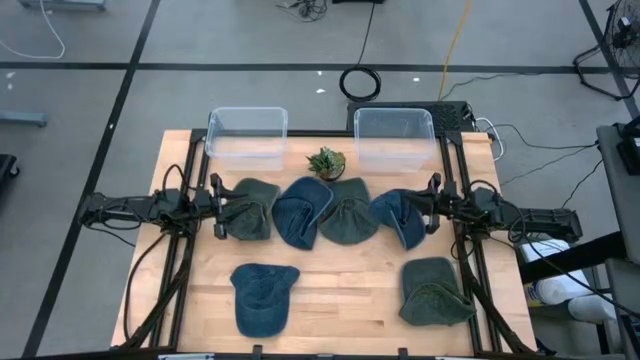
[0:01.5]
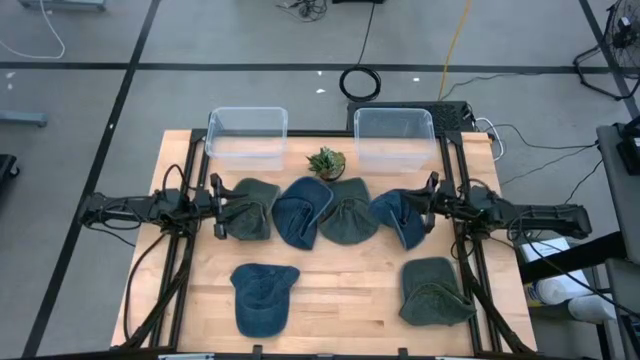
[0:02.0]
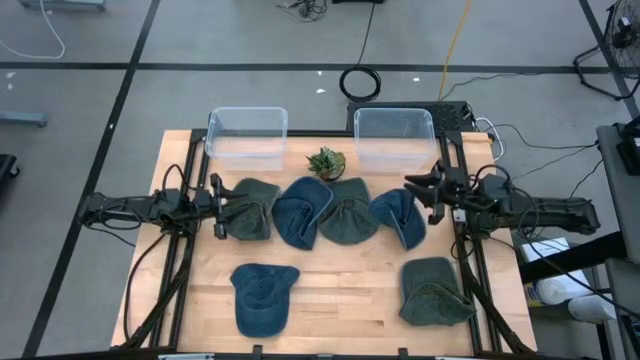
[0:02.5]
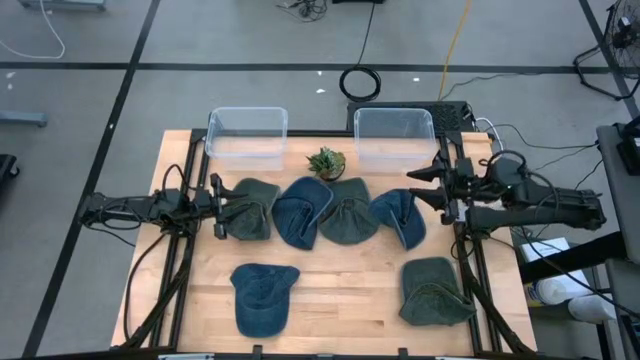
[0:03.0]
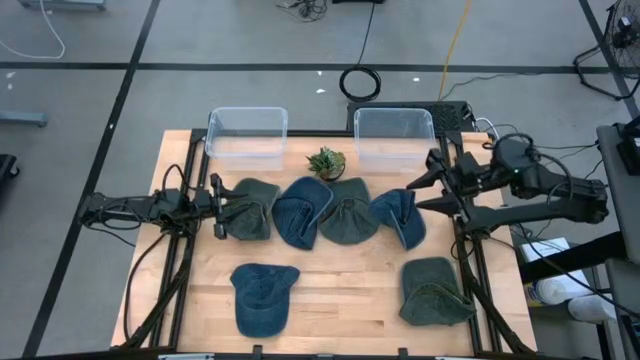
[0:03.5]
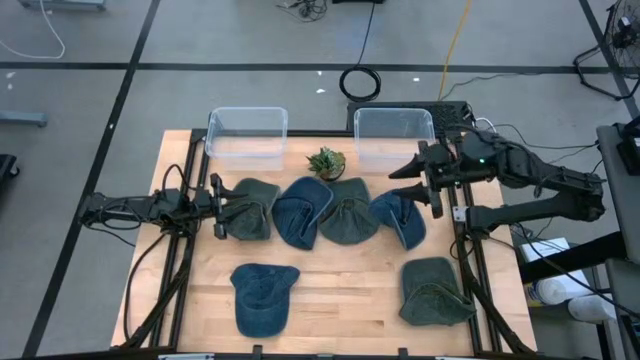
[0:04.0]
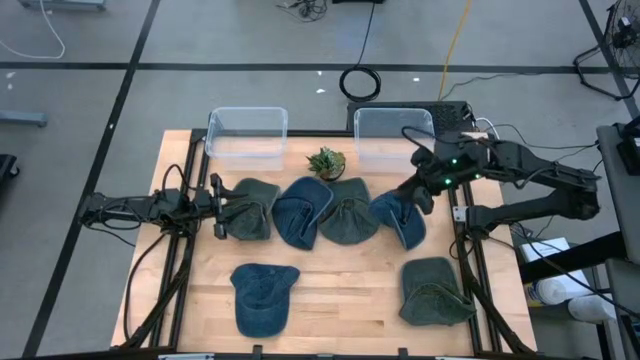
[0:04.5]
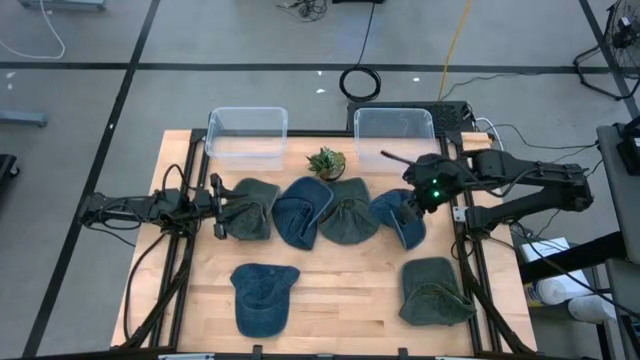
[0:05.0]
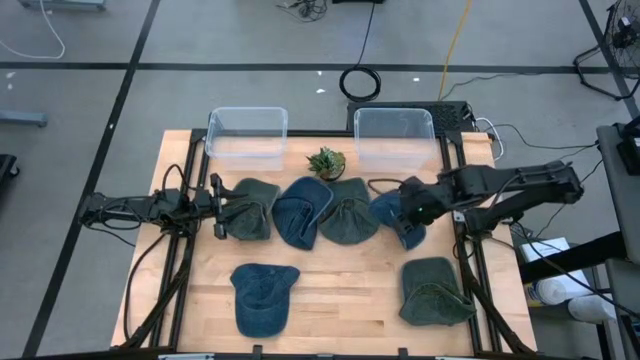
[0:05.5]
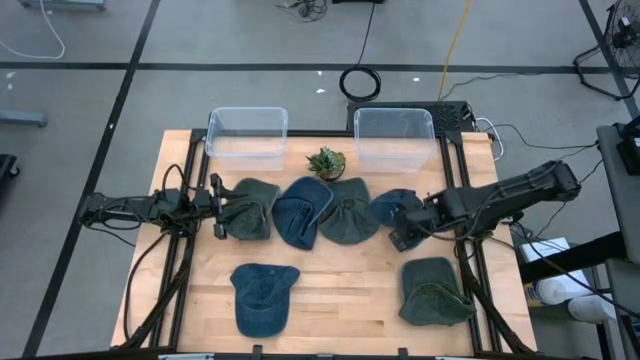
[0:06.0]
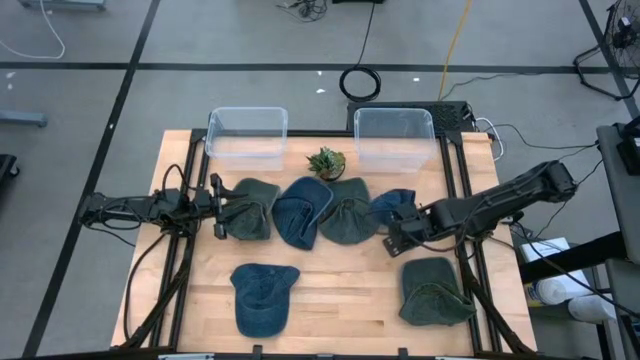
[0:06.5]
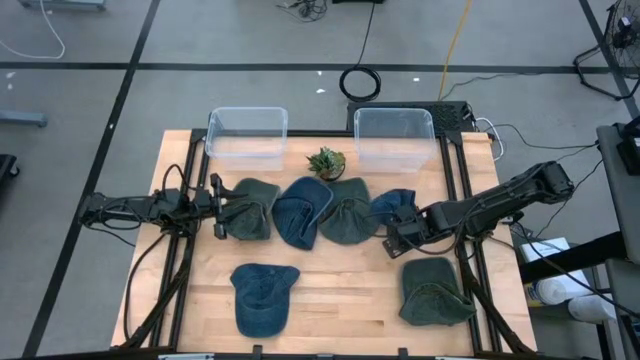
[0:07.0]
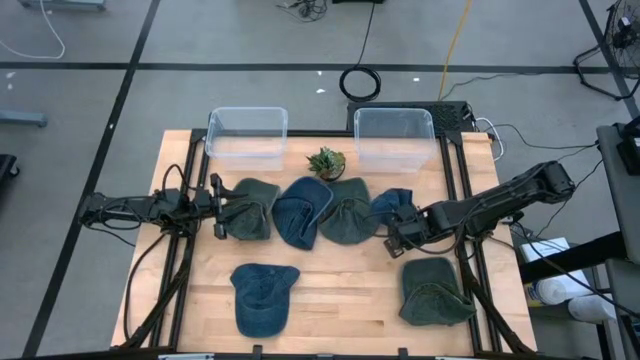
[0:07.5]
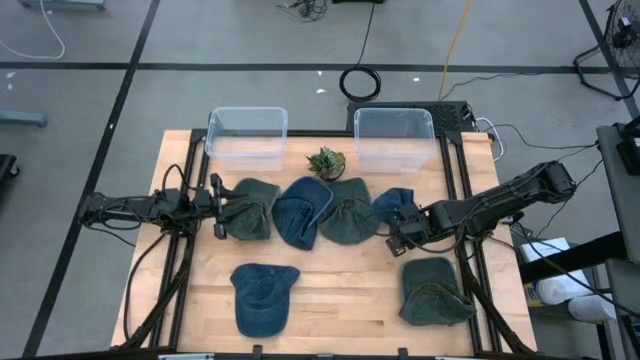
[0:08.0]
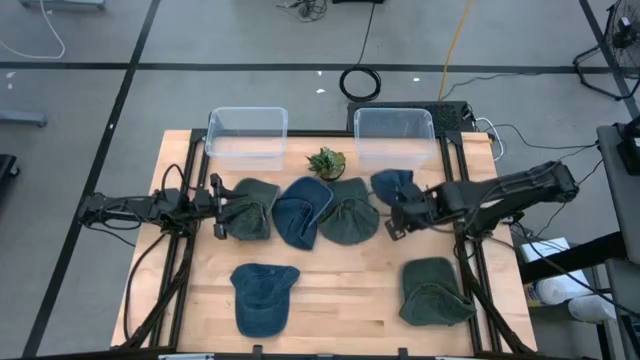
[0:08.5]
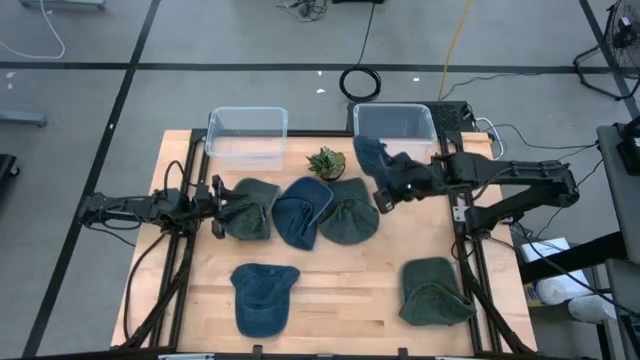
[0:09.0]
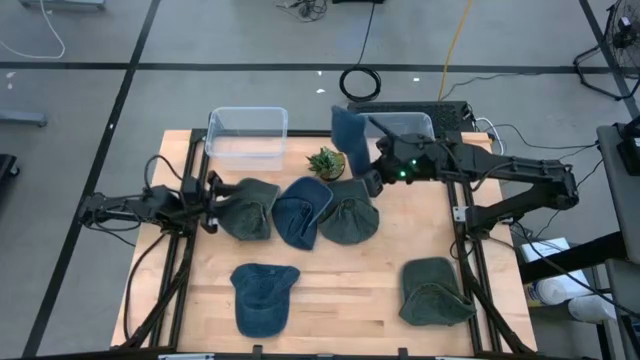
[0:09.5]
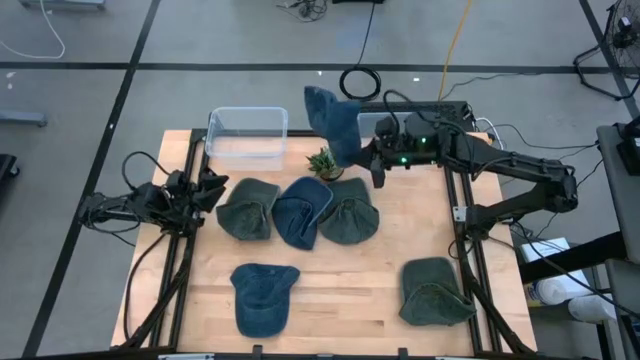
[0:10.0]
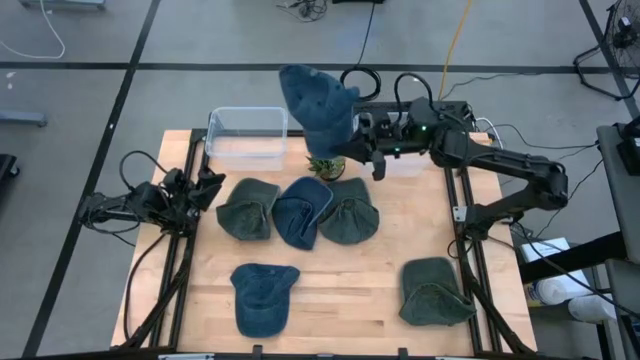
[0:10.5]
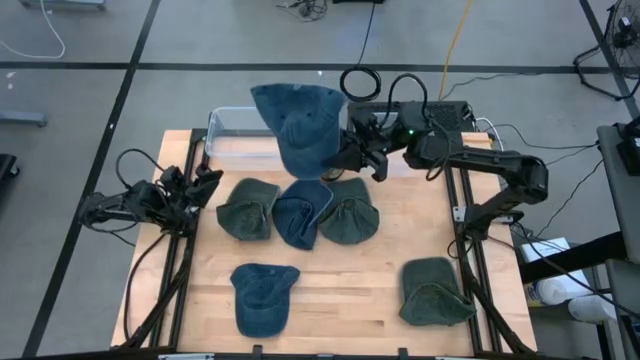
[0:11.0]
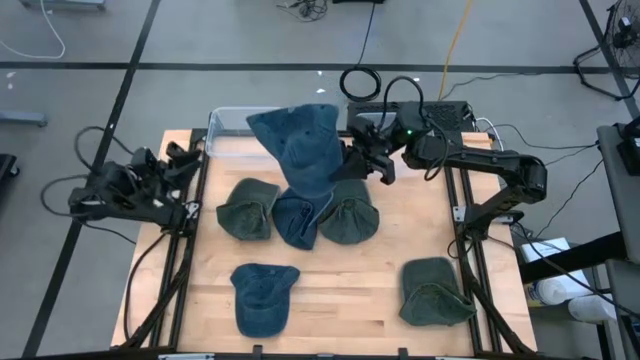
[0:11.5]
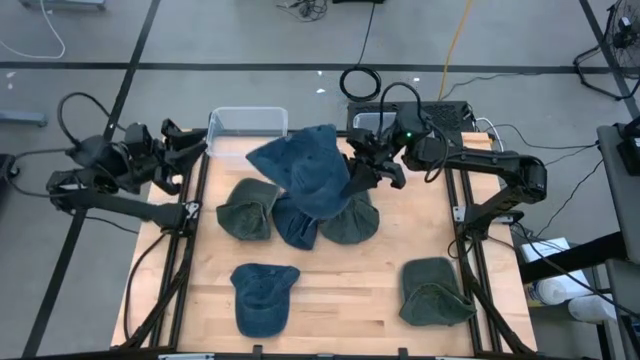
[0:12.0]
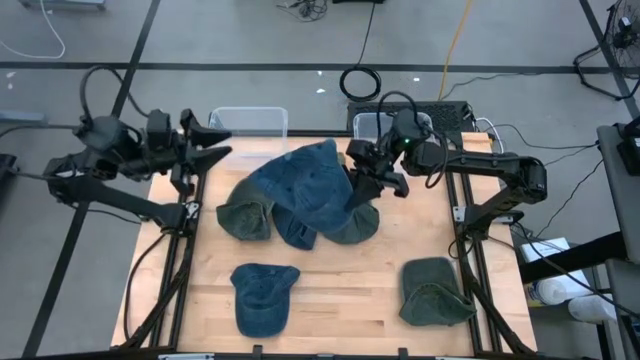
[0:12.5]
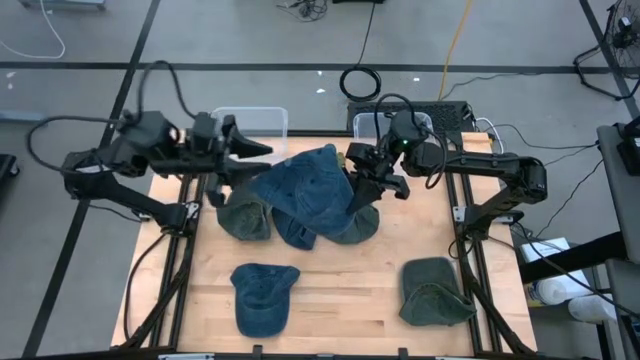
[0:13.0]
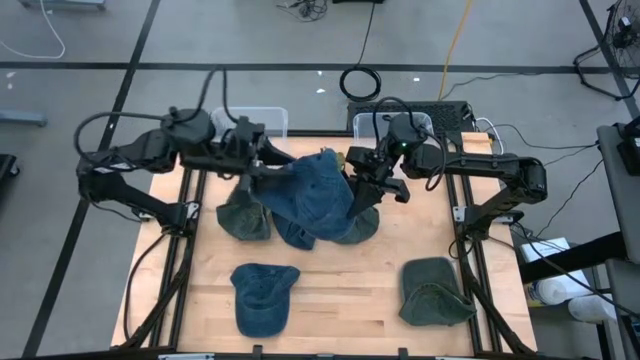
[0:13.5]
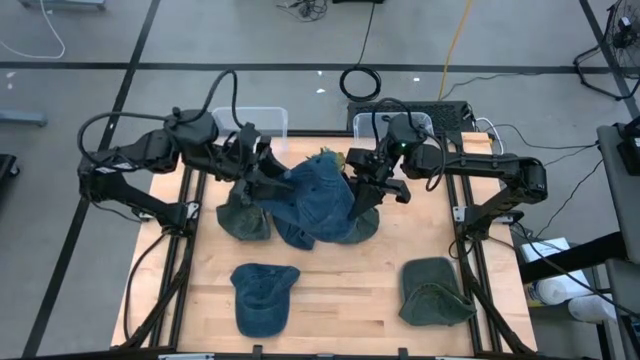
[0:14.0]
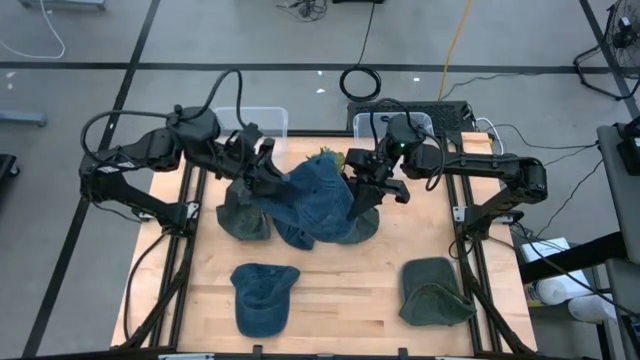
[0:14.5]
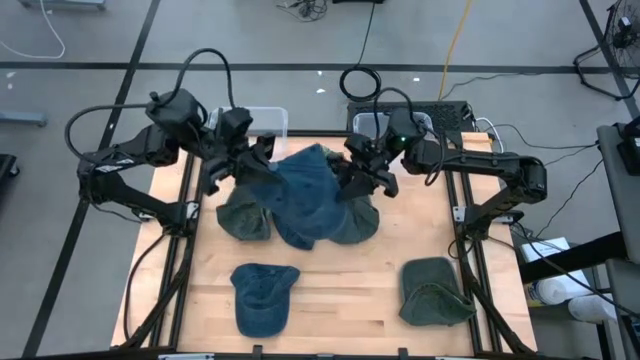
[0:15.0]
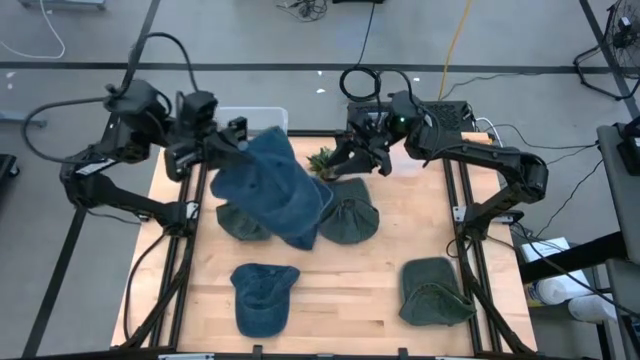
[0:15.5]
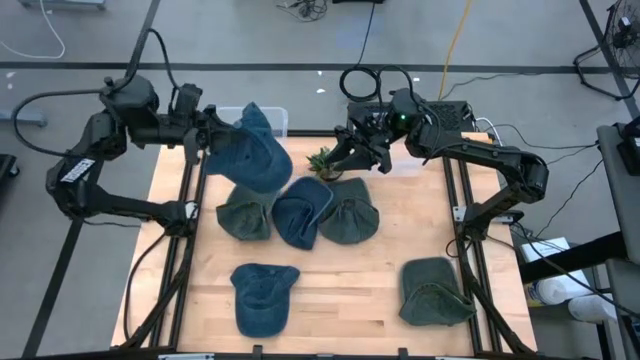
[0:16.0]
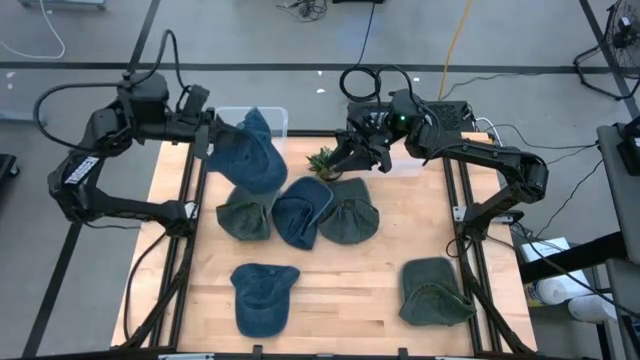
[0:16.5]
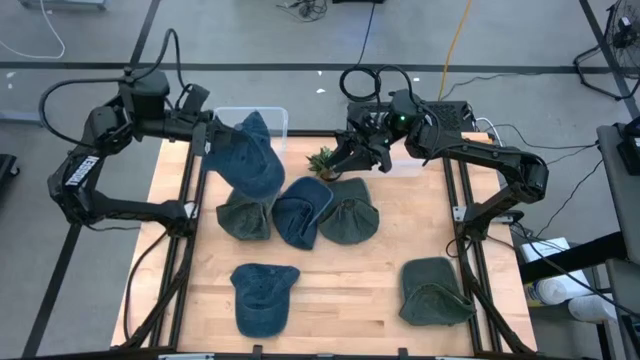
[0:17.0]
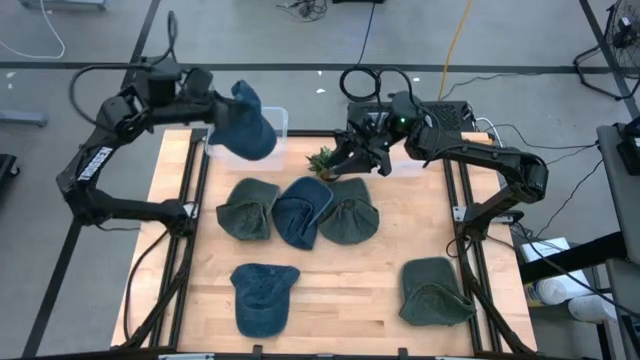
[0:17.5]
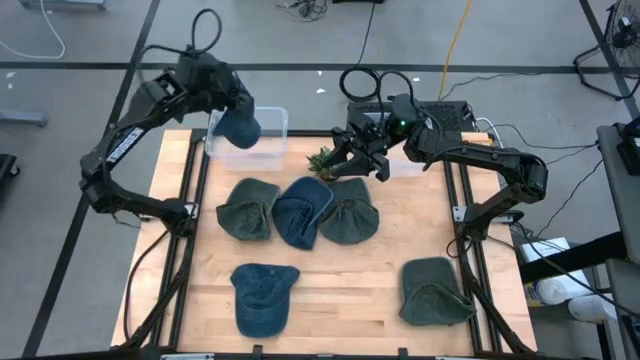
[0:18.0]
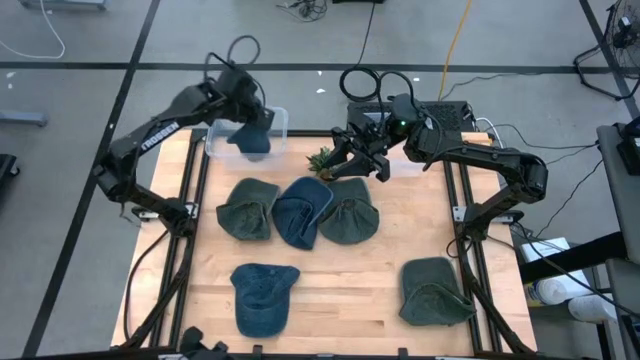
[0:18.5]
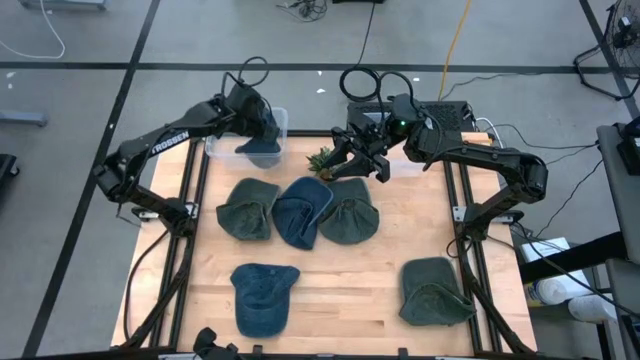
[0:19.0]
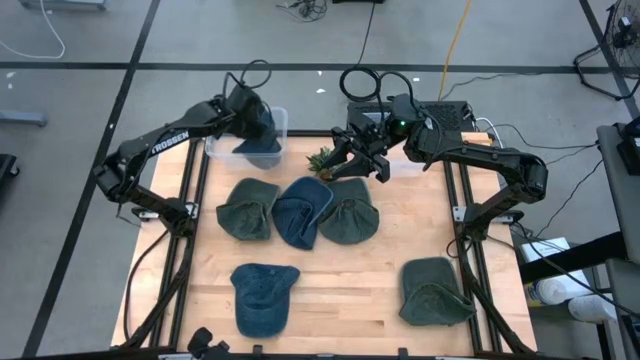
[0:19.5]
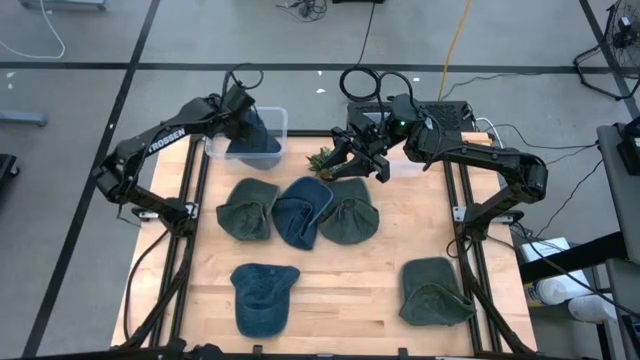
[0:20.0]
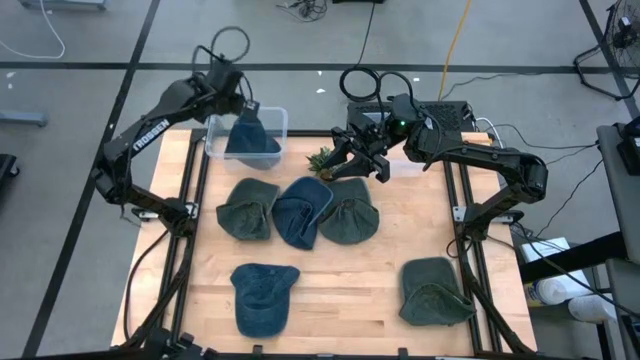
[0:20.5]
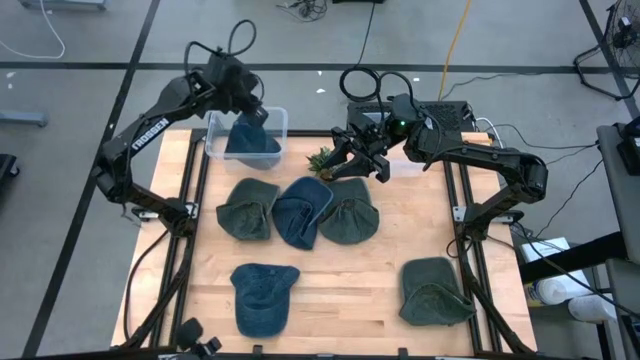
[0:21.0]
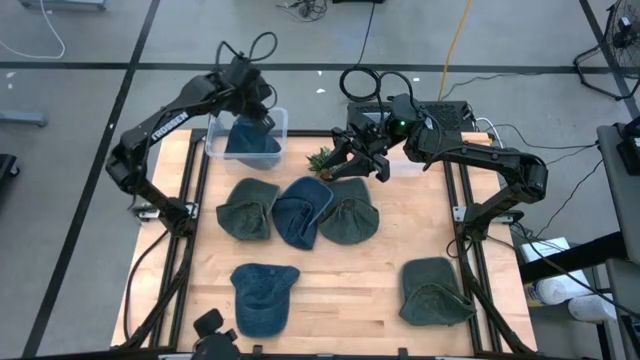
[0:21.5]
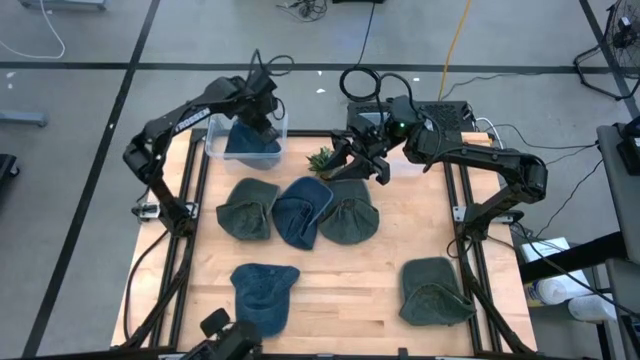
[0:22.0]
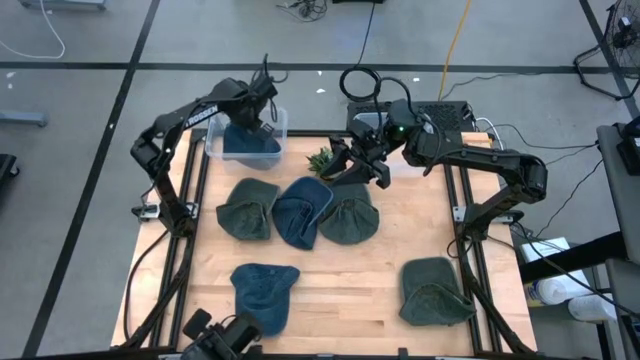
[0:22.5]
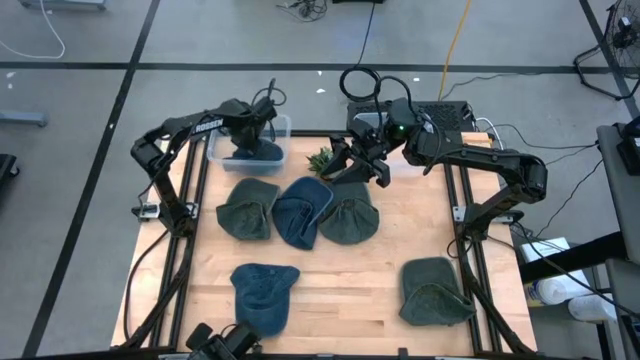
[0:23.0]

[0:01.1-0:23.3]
Task: Pick & Place hat
Put the top right blue cap into the left transparent bin
